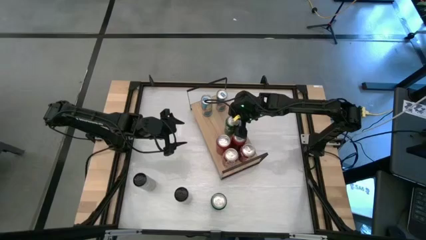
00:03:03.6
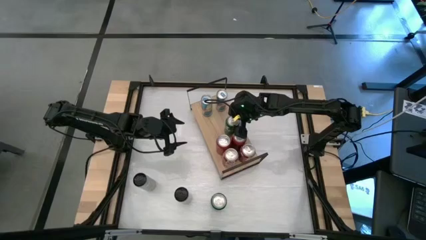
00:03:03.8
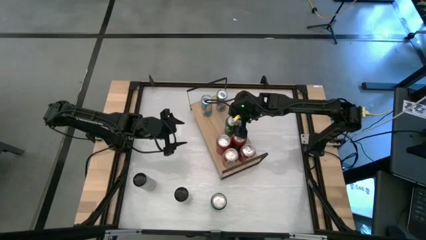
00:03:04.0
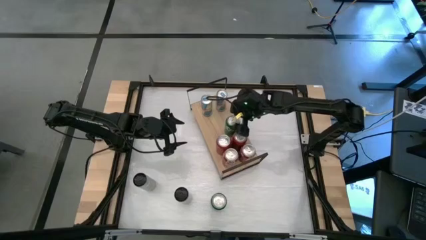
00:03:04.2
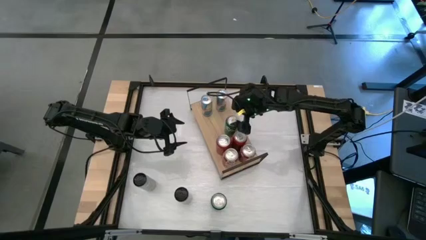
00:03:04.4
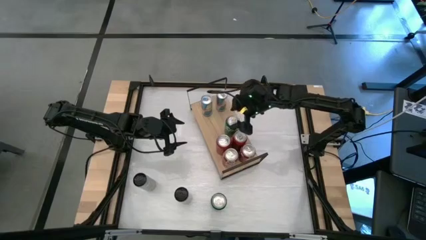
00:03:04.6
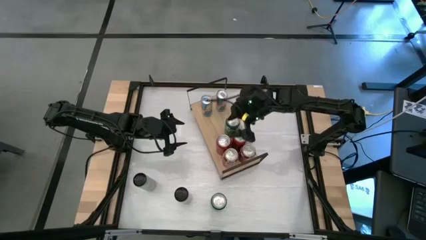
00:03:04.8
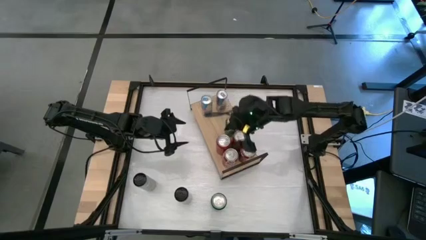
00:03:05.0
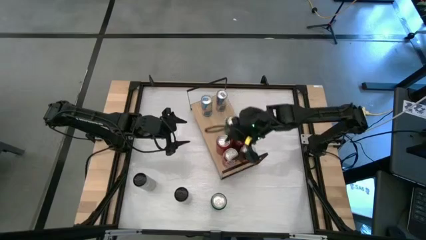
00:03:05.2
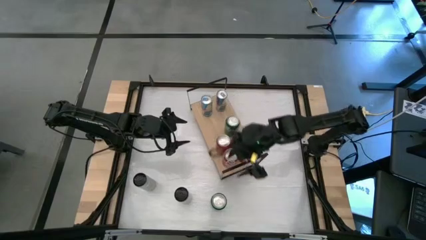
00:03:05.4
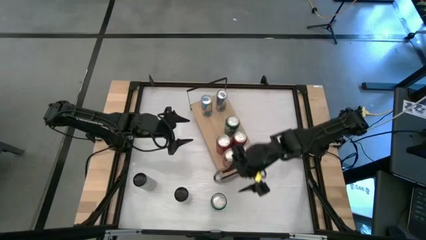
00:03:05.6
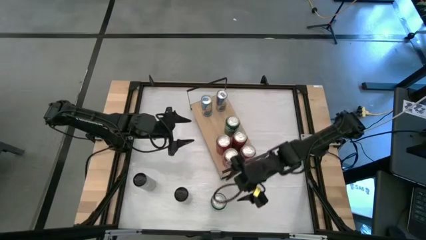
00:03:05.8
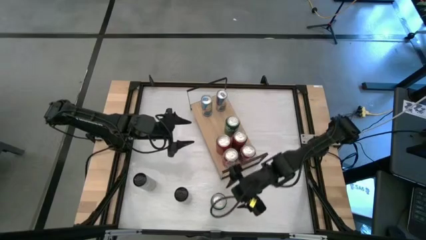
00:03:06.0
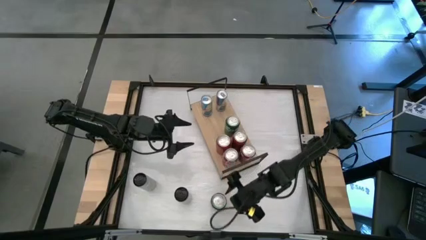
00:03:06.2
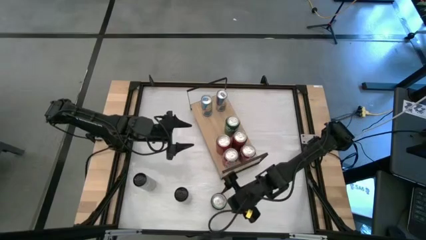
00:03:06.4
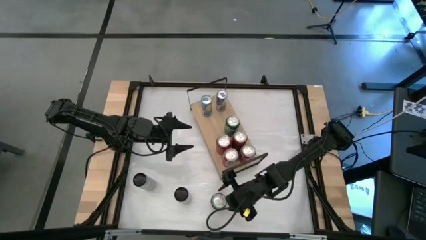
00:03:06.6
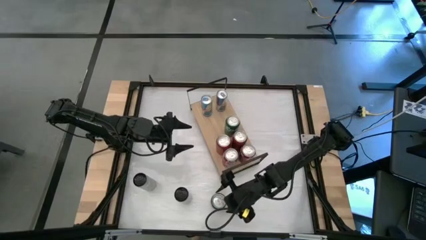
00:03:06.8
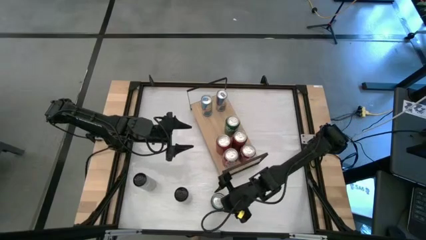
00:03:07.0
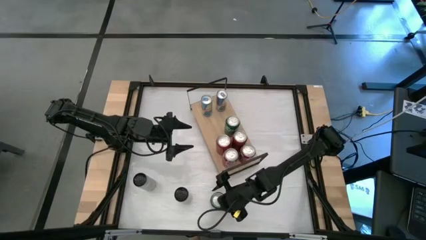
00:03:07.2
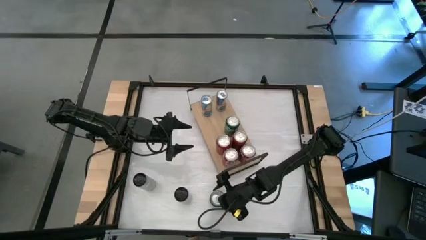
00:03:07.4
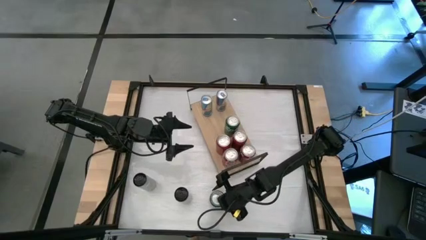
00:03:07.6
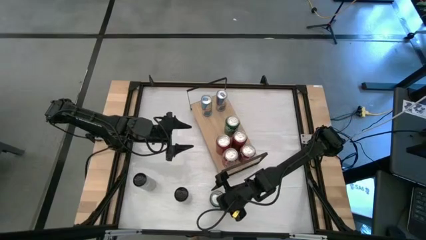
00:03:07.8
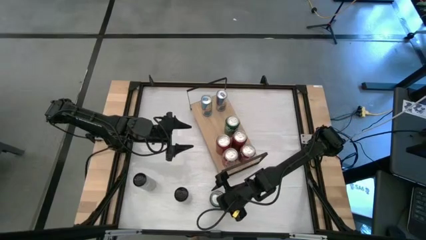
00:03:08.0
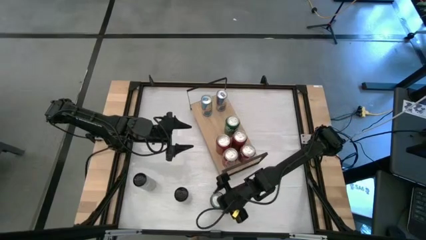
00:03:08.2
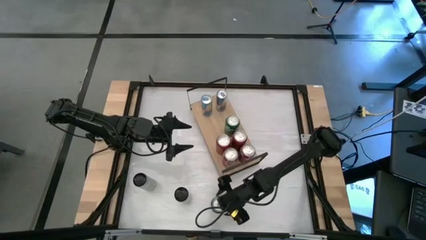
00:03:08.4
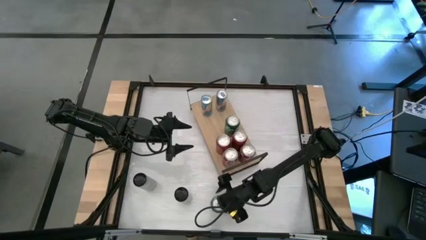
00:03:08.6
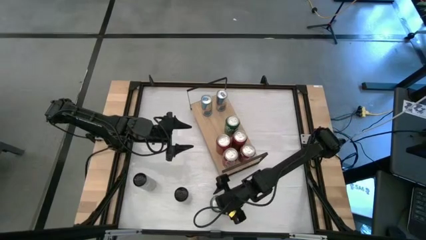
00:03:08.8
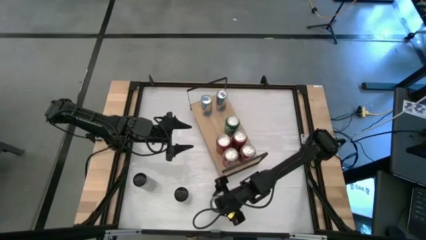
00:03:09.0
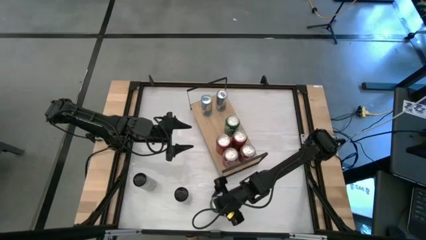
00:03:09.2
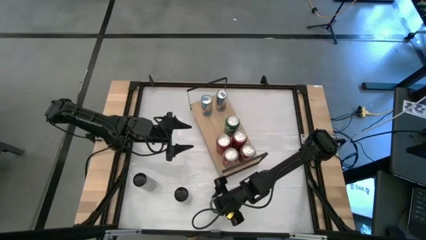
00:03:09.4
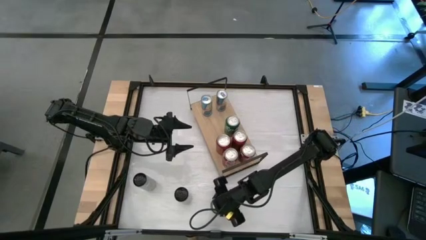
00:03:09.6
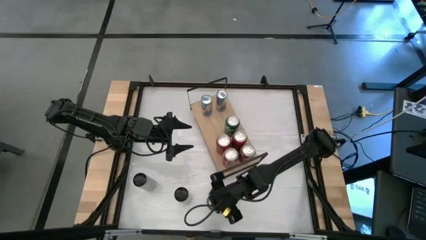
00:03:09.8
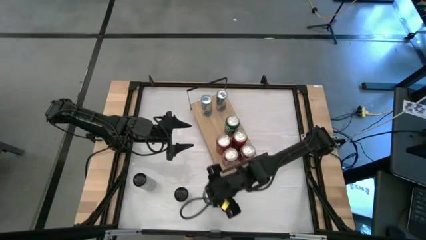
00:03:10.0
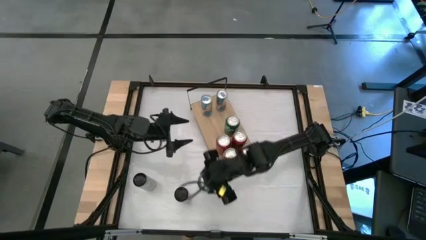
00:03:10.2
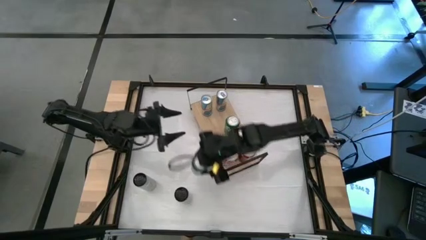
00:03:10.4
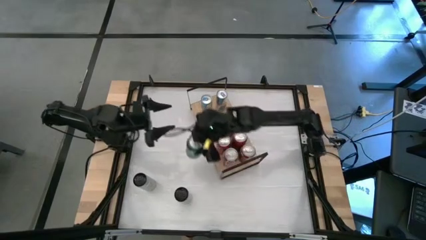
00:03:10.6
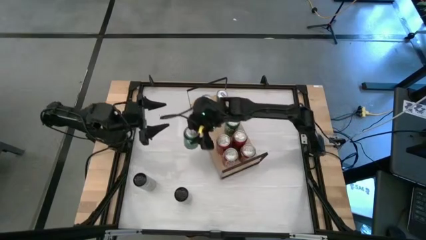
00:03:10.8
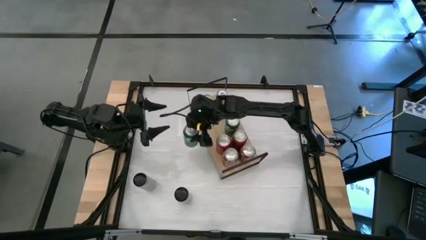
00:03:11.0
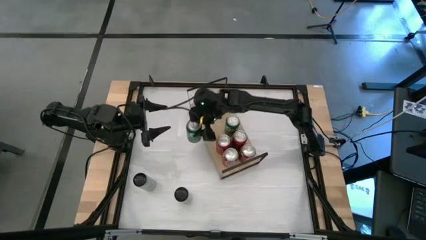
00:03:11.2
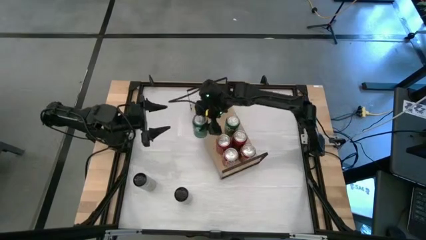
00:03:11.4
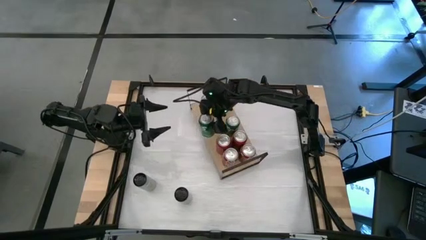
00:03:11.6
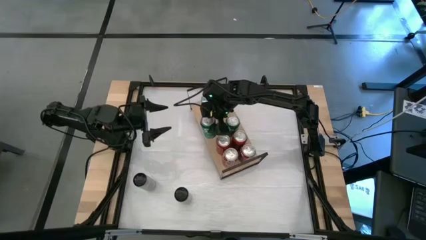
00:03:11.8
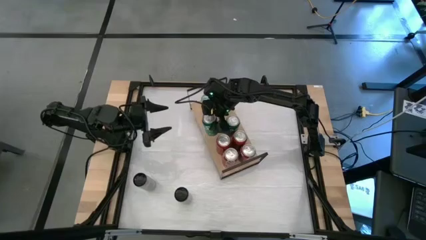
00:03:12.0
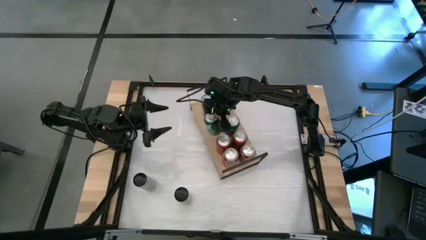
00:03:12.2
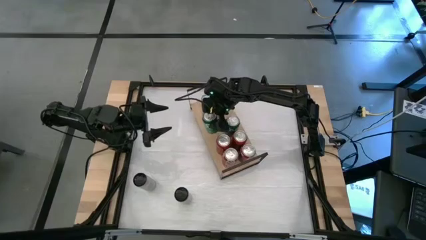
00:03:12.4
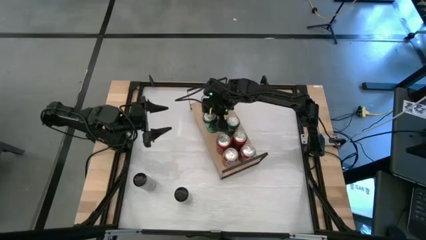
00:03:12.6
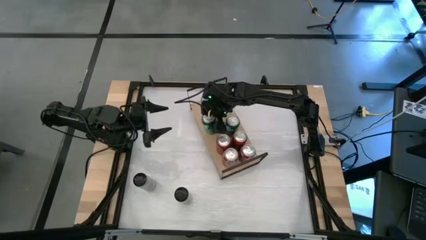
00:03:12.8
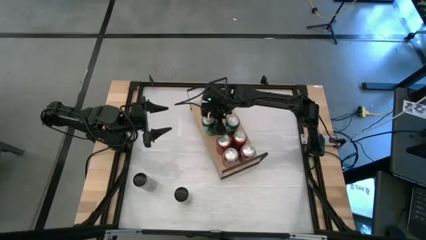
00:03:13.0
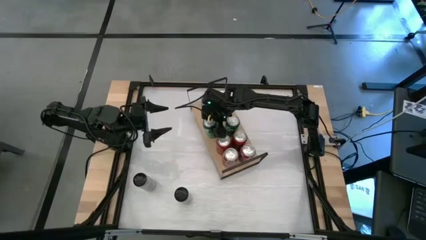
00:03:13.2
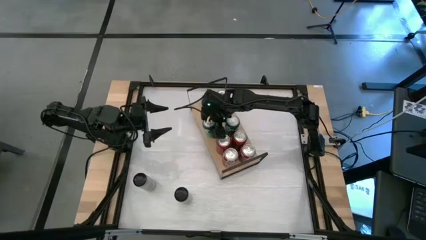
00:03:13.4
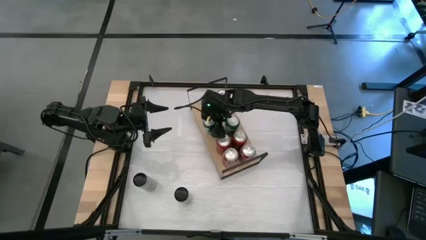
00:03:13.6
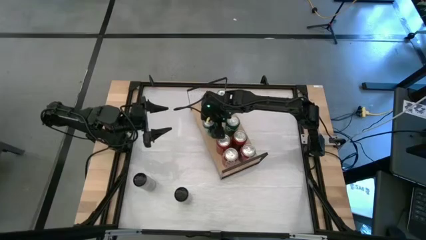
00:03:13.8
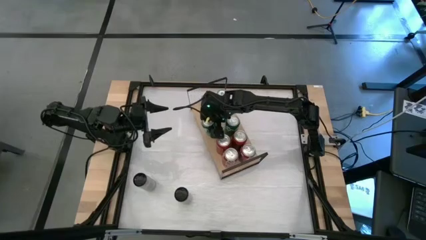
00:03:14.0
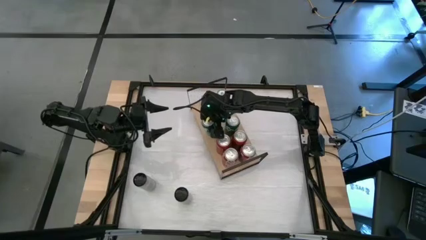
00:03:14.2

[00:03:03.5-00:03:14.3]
Task: Place canned beverage on shelf
Put the green soda can on the shelf aligned with the other green soda can

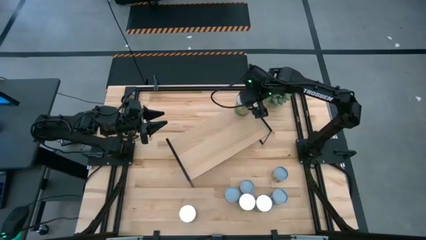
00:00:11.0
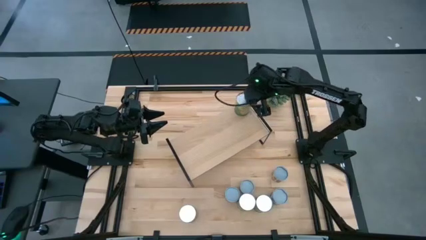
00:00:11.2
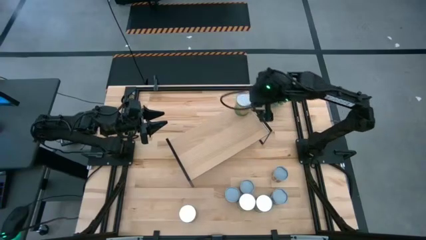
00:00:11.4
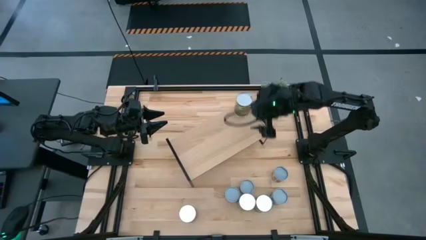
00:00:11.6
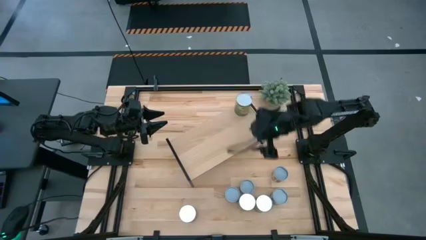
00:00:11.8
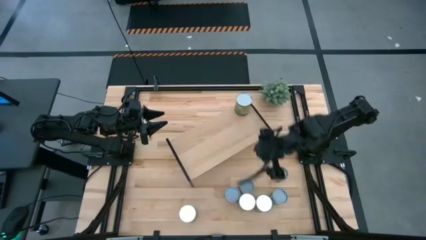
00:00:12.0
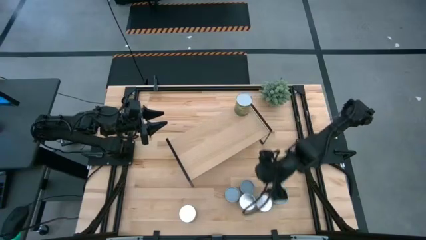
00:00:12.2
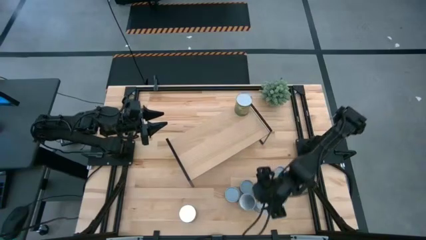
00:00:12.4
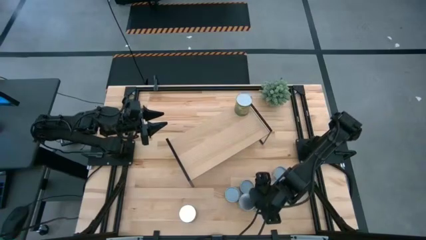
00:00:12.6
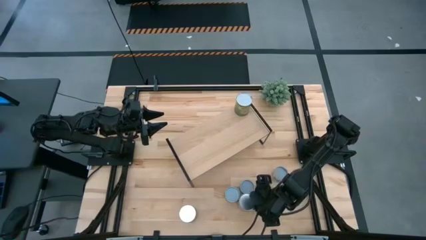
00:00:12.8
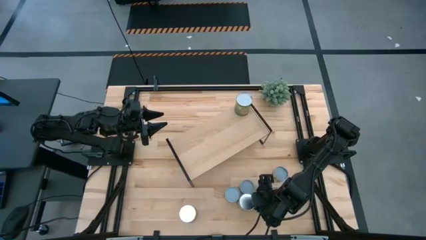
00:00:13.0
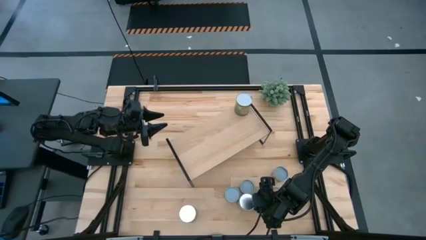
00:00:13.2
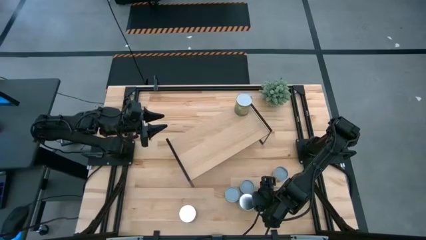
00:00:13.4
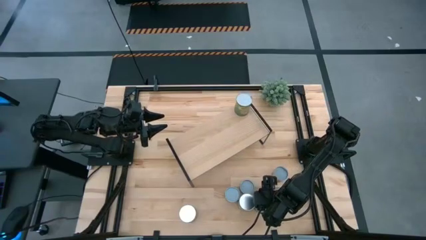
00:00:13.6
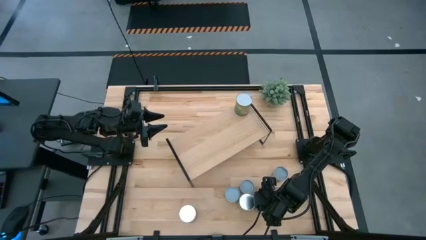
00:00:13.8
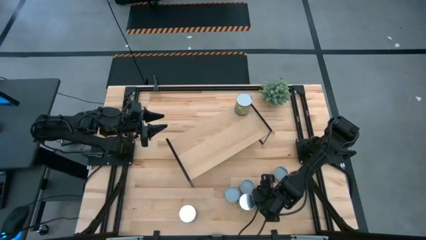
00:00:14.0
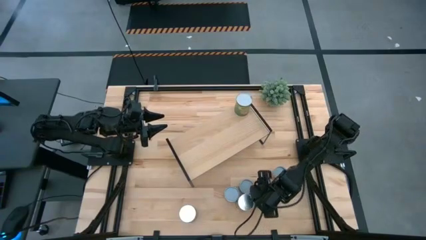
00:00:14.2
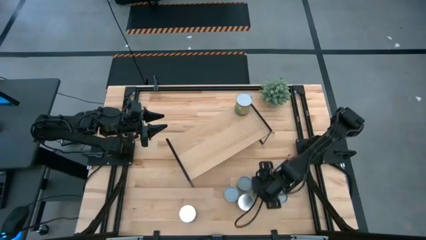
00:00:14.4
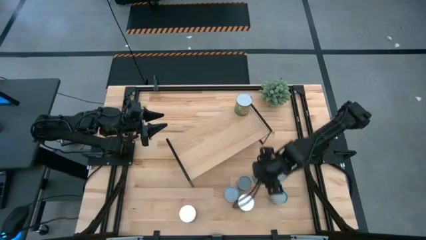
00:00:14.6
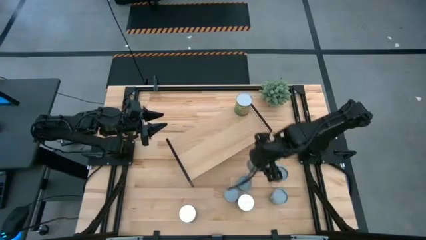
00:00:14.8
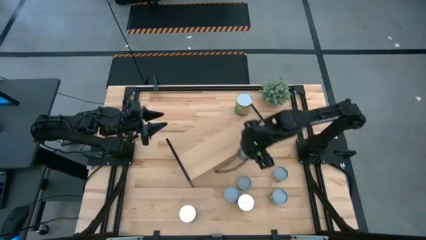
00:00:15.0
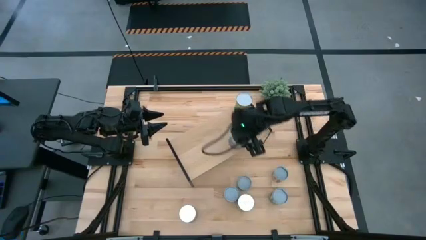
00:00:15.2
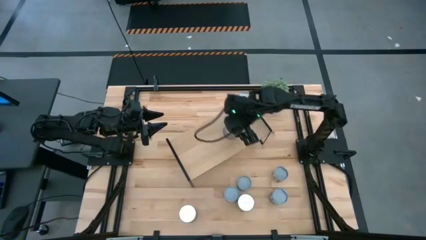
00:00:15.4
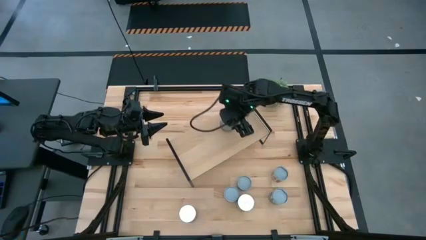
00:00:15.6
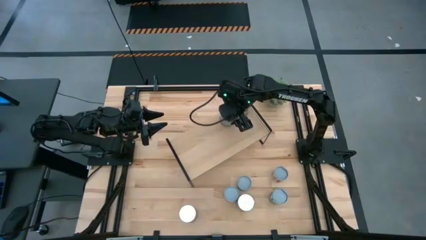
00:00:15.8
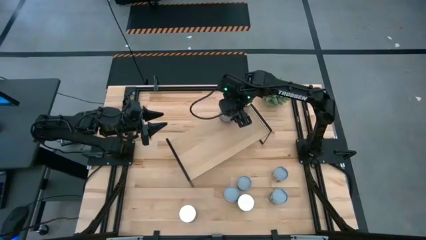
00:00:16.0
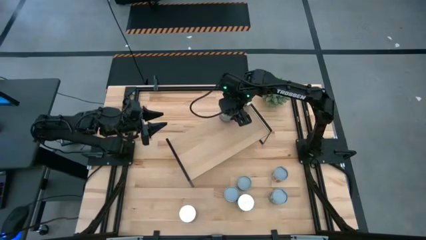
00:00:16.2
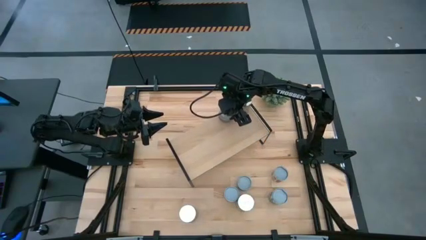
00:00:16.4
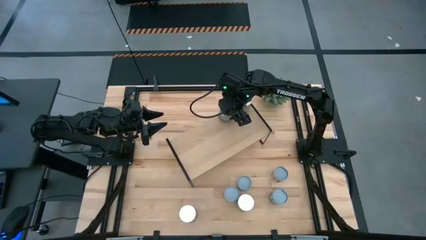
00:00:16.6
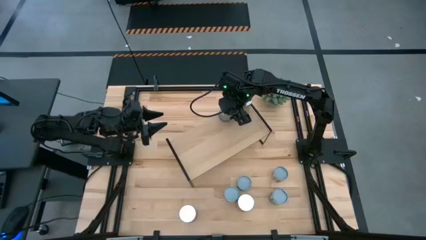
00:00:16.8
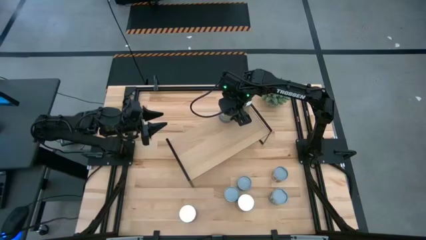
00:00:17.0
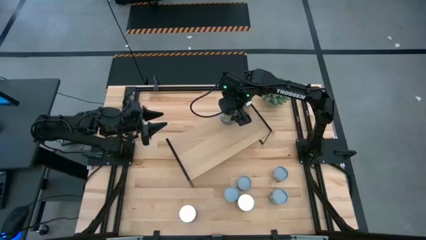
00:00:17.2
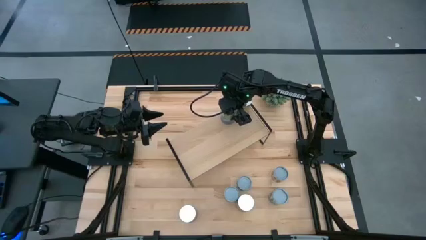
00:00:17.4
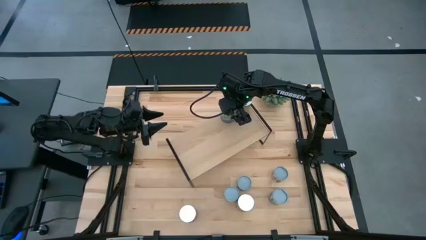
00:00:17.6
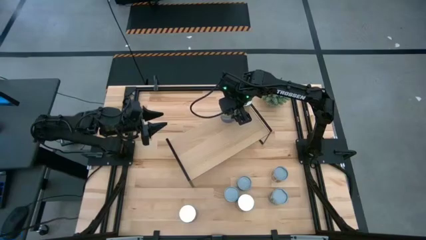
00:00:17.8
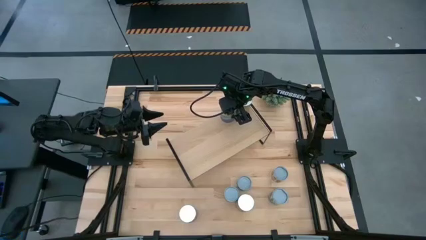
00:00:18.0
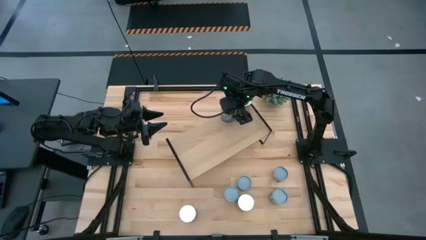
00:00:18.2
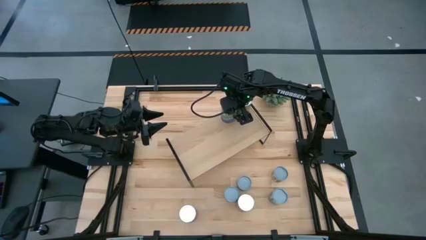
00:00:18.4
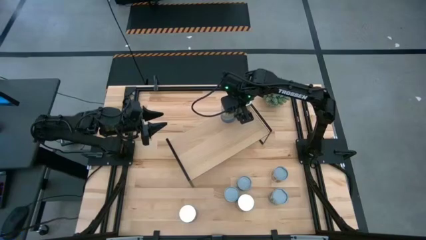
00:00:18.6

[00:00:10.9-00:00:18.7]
Task: Pick and place cans onto a shelf
Put the big canned peas on the shelf
